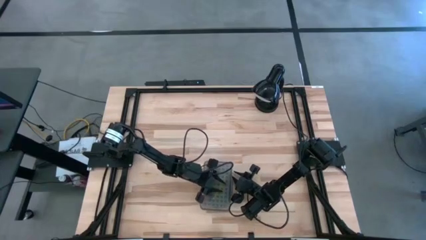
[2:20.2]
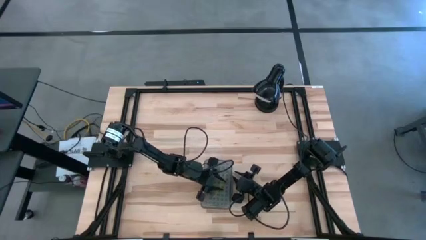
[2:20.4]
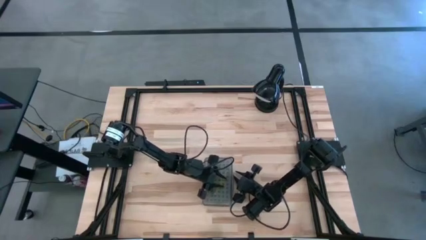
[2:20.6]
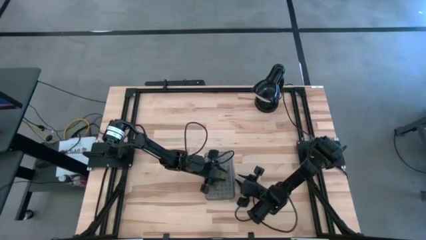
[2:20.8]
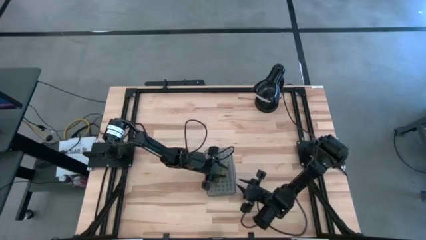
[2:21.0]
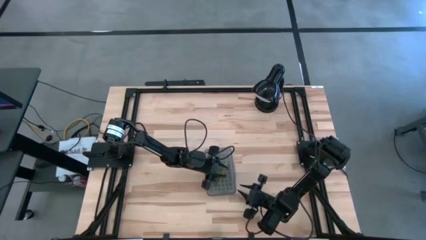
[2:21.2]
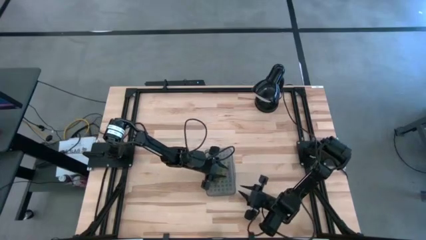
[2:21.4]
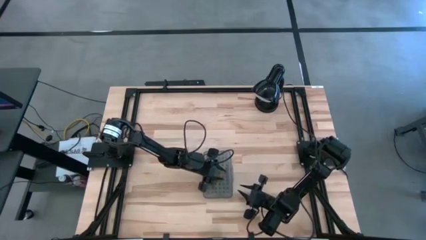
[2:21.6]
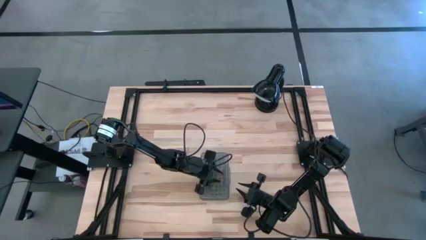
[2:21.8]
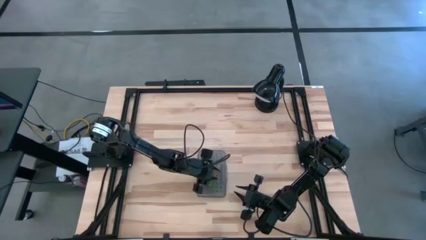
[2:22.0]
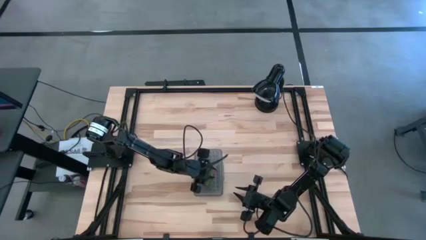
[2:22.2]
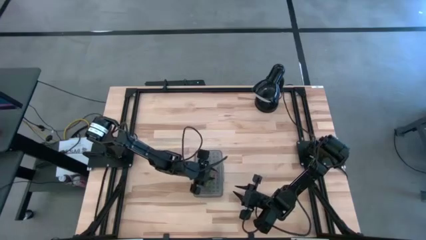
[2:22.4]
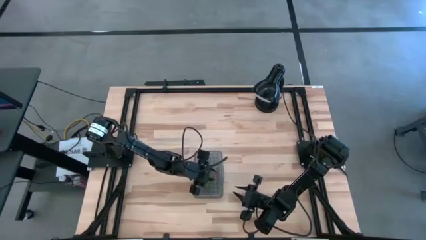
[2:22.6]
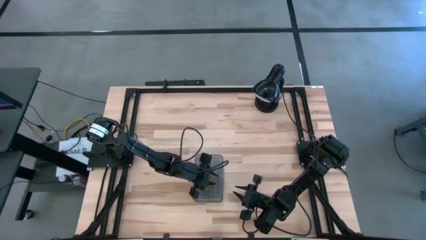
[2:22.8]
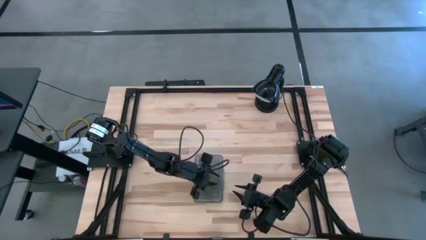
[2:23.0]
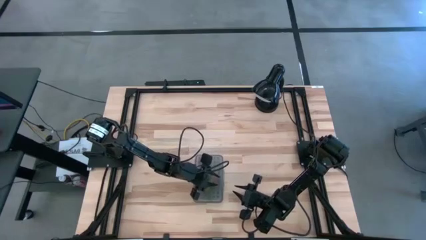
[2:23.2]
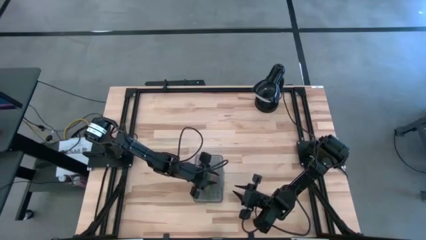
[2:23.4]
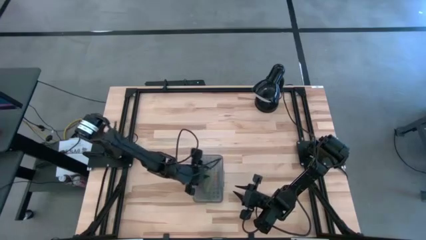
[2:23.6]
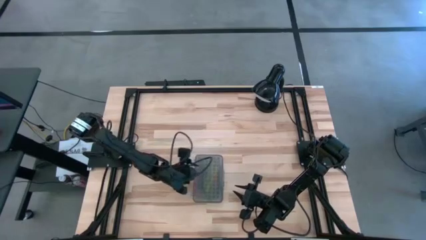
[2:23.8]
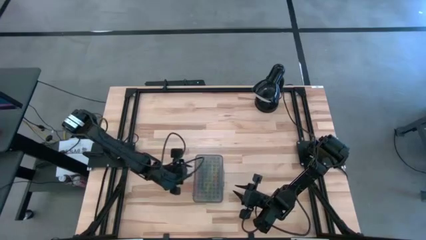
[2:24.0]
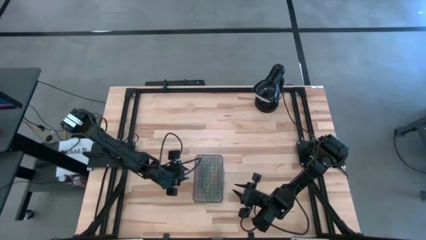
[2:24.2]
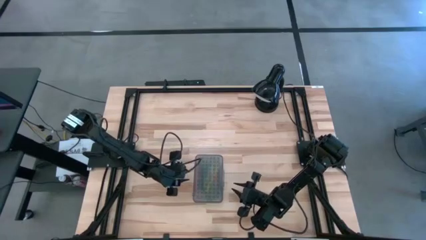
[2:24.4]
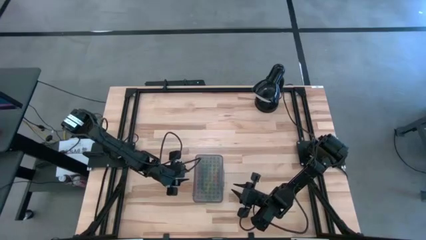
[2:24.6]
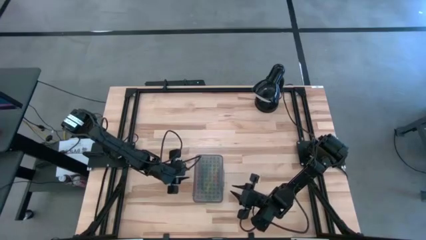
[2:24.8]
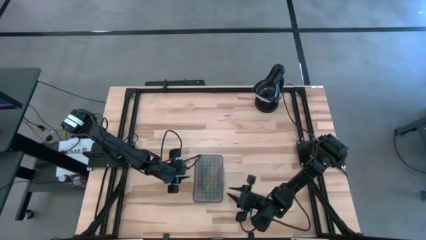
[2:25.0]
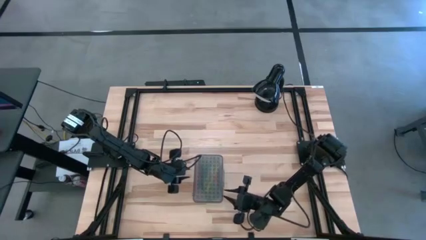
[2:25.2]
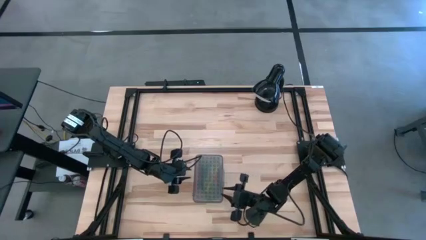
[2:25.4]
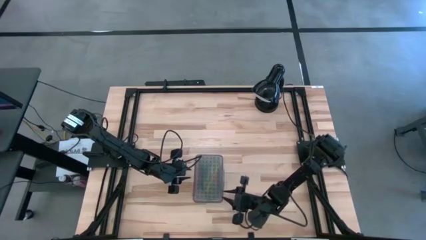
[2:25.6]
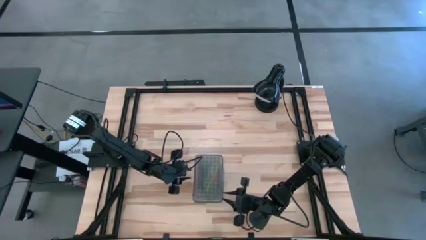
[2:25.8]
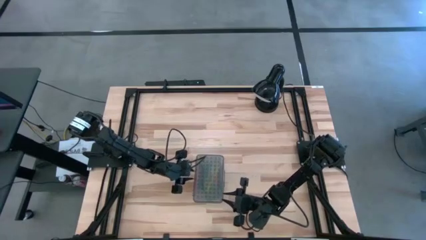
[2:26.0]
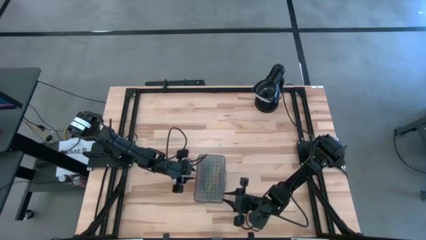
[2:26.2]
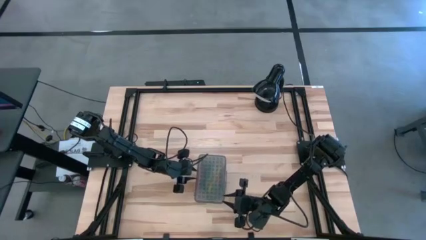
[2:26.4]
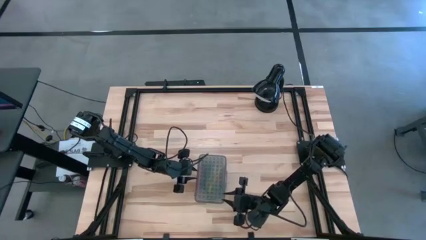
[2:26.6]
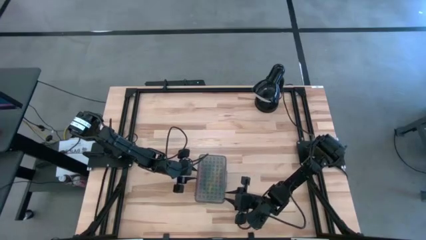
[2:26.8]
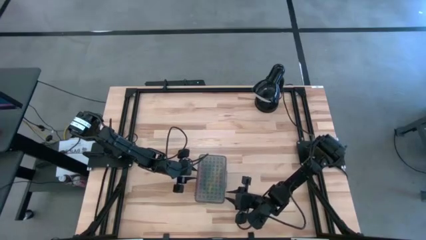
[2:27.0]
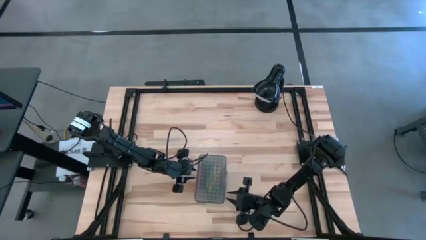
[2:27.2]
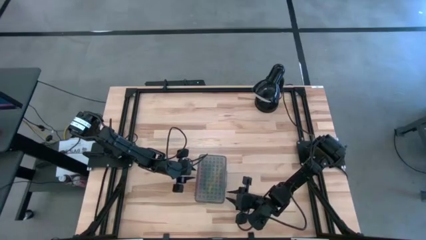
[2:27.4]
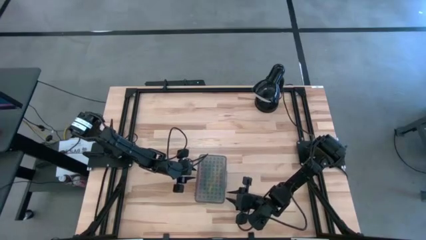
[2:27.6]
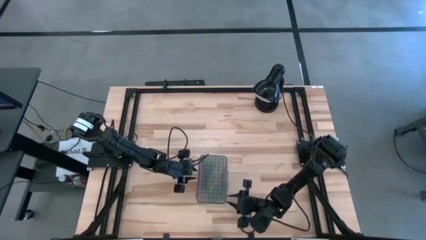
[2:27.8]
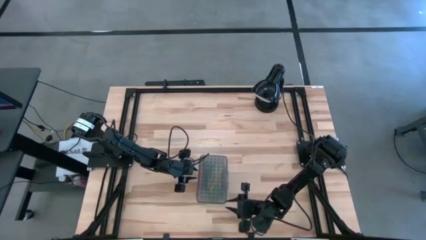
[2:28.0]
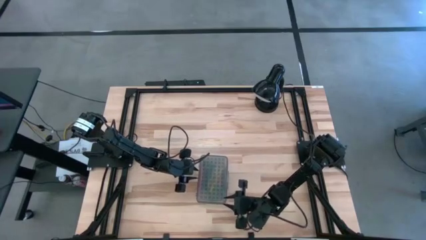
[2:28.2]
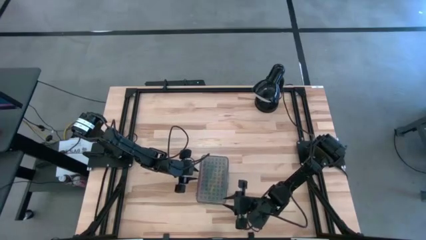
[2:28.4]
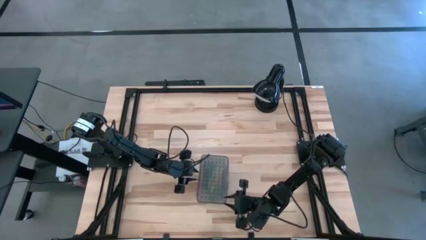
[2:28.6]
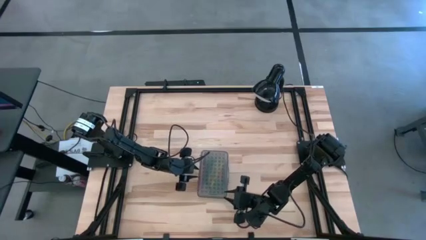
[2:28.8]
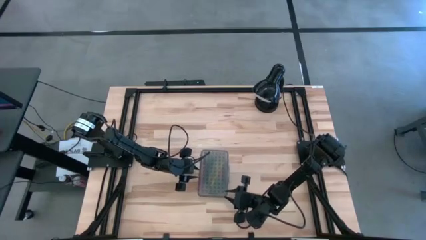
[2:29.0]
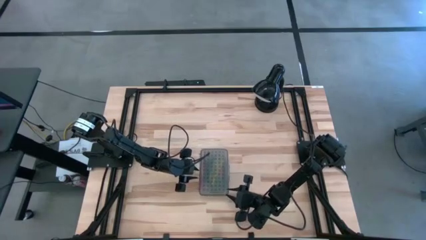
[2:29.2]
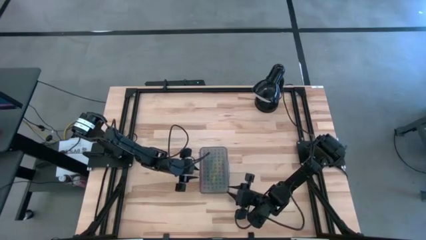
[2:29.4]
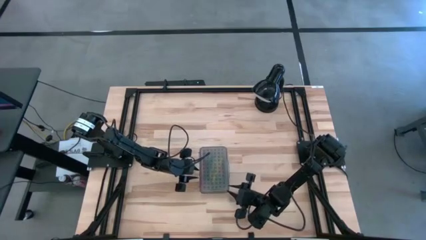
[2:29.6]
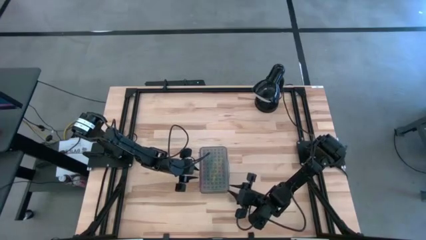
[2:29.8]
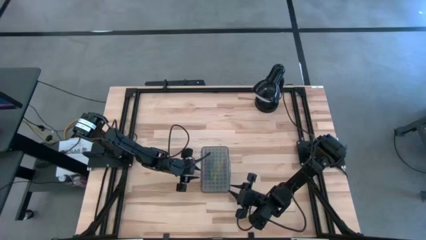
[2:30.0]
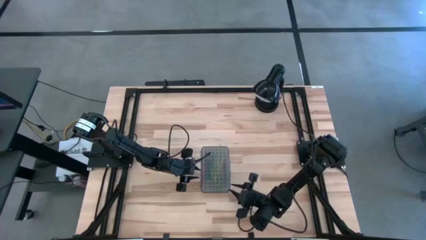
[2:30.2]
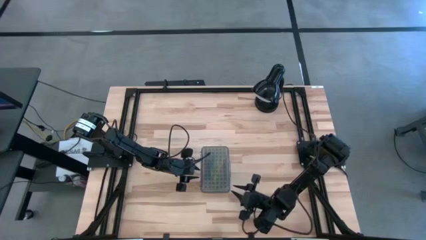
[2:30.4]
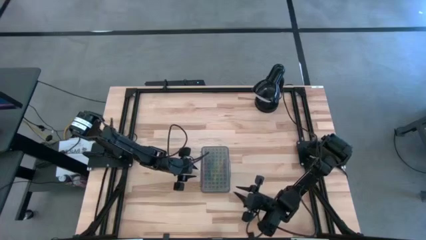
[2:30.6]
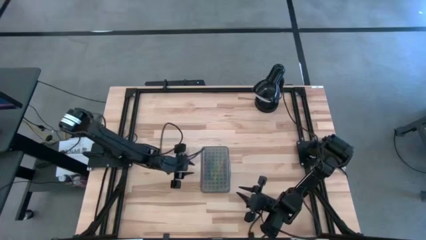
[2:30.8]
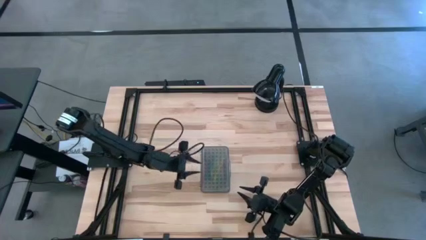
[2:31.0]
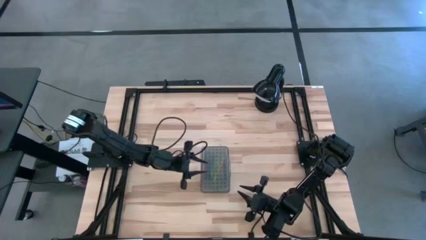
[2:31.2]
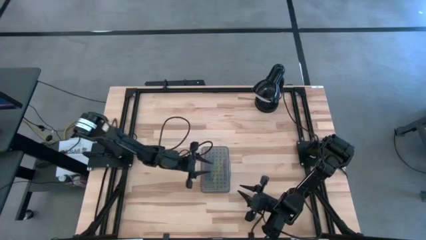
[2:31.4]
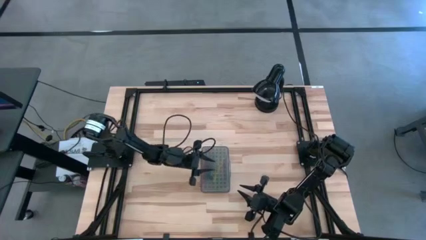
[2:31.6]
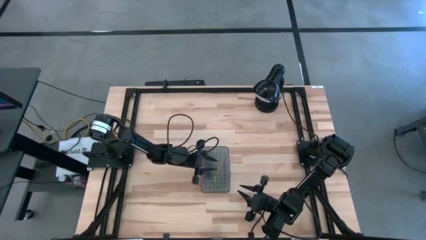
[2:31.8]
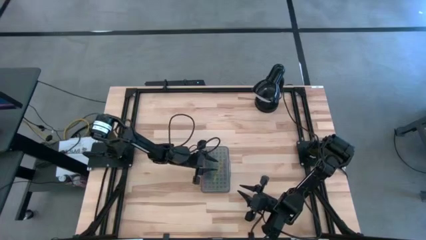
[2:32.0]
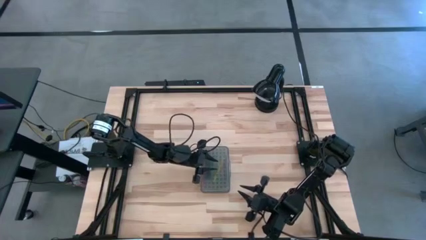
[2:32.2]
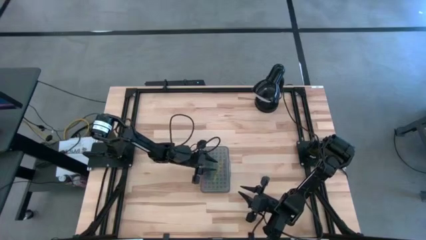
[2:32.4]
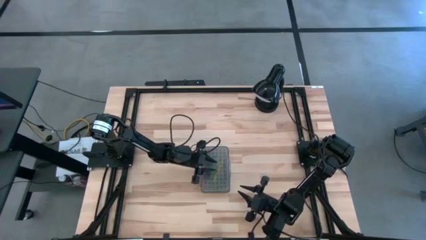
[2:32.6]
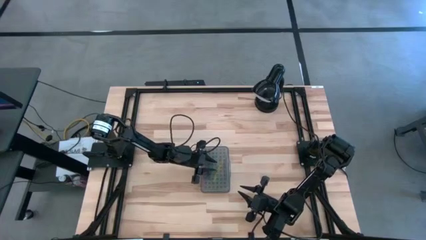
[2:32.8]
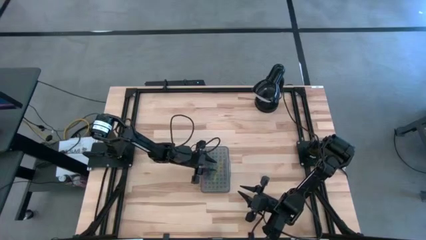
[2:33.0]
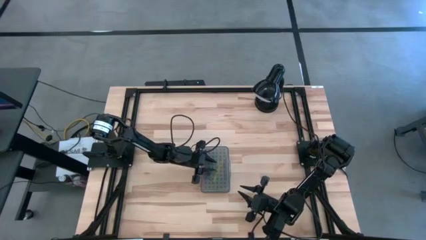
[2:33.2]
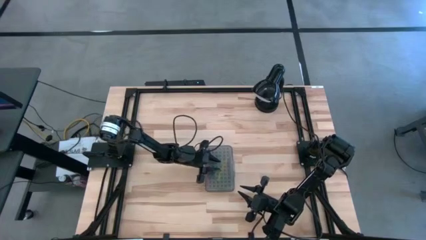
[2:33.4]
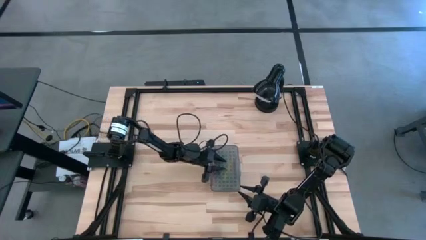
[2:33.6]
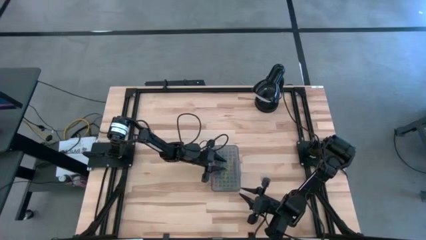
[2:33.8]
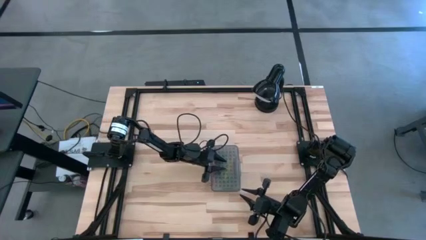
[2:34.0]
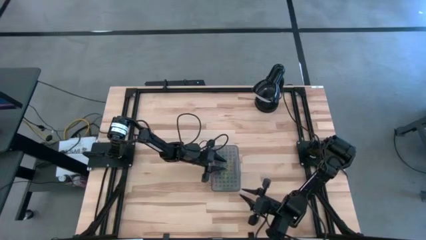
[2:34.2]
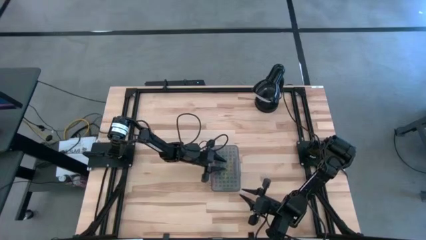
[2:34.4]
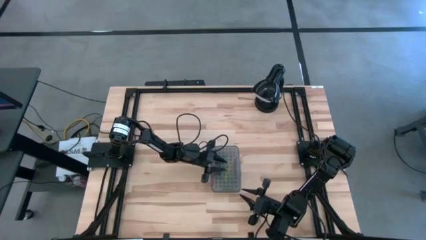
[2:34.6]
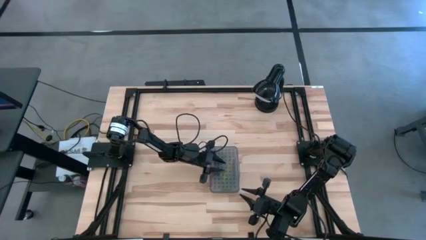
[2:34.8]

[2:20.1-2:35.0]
Task: Pick & place school supplies into a supply box
Close the transparent supply box
